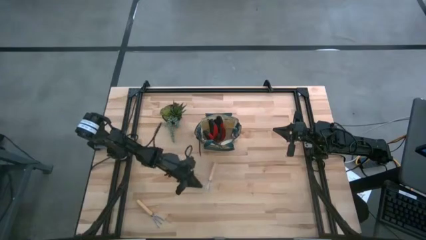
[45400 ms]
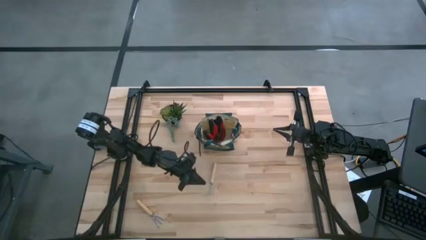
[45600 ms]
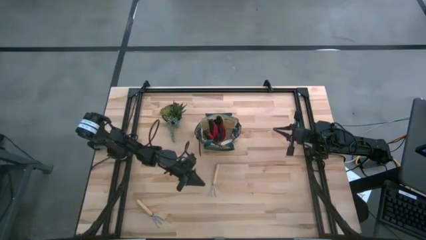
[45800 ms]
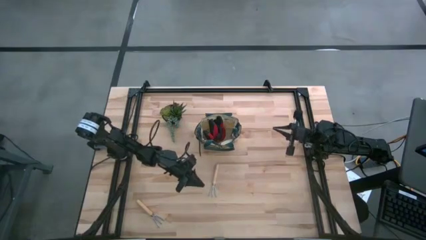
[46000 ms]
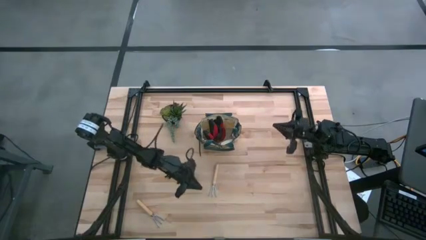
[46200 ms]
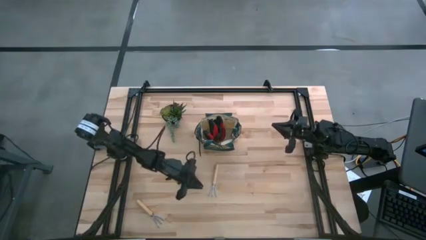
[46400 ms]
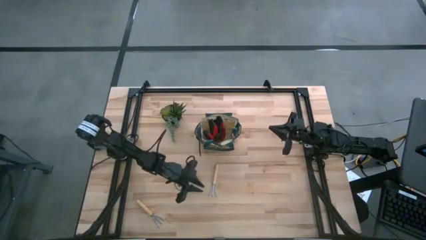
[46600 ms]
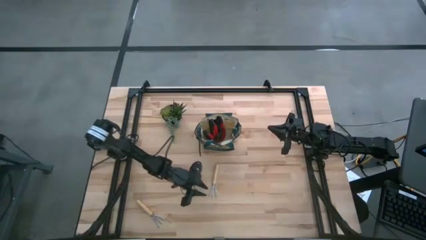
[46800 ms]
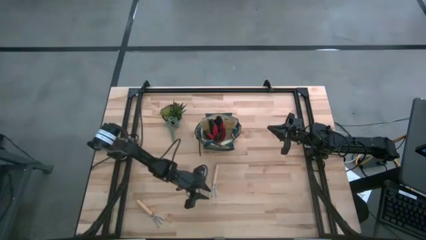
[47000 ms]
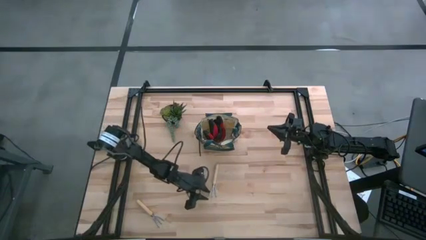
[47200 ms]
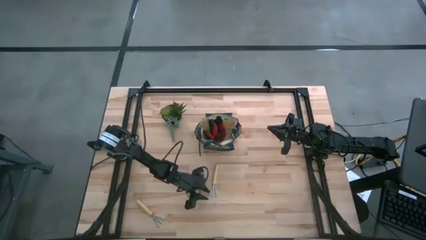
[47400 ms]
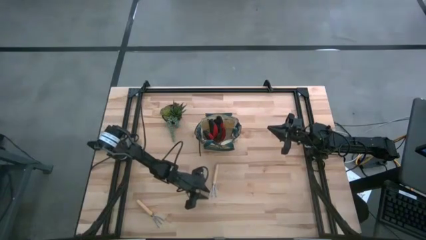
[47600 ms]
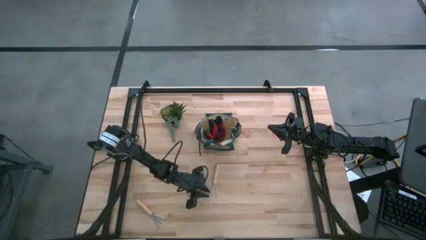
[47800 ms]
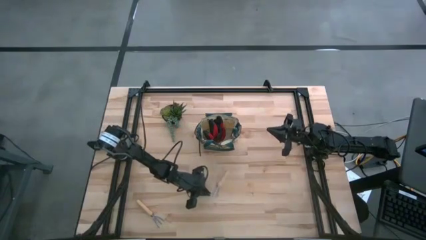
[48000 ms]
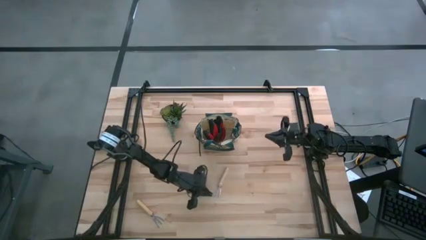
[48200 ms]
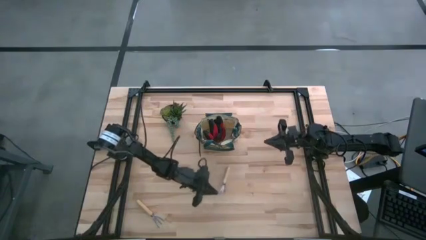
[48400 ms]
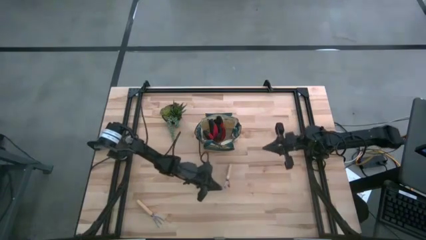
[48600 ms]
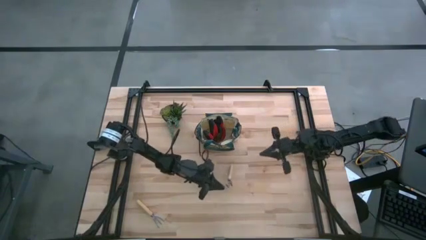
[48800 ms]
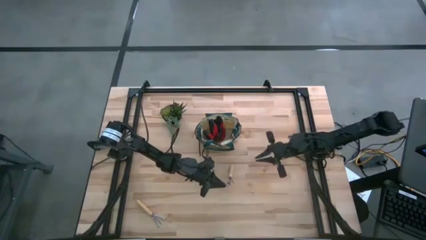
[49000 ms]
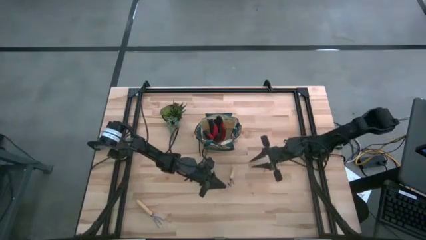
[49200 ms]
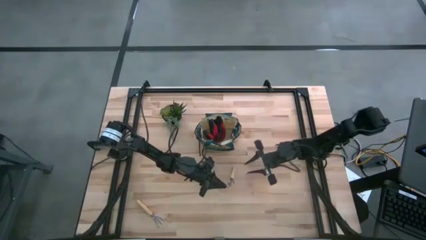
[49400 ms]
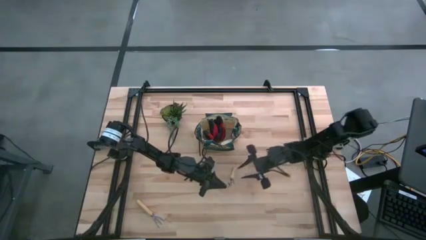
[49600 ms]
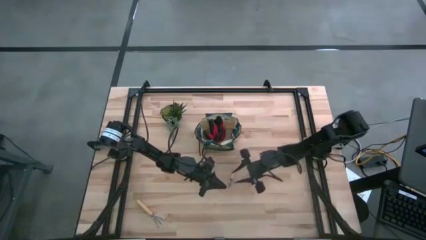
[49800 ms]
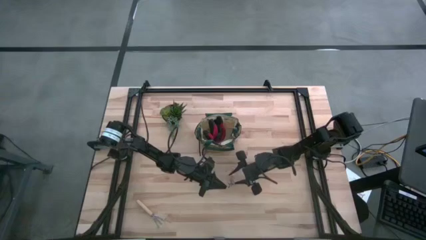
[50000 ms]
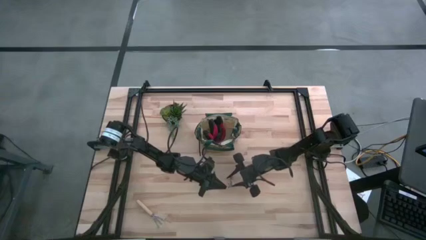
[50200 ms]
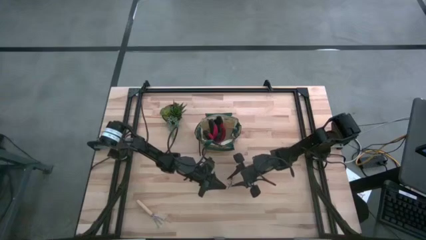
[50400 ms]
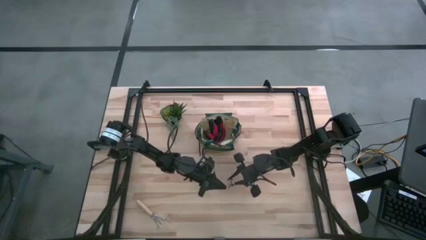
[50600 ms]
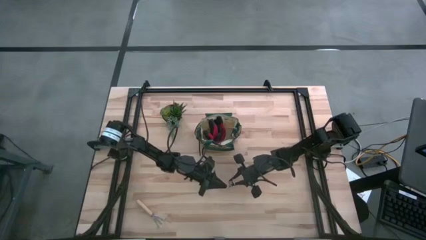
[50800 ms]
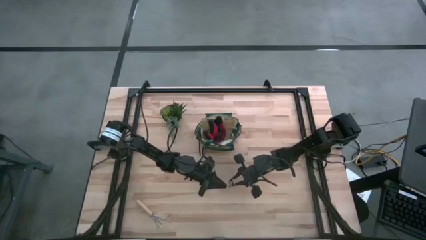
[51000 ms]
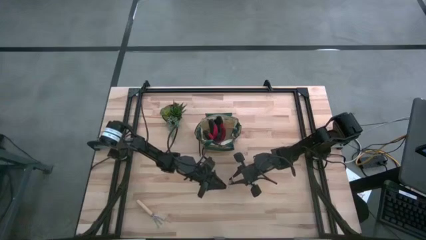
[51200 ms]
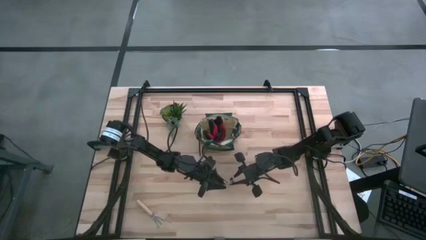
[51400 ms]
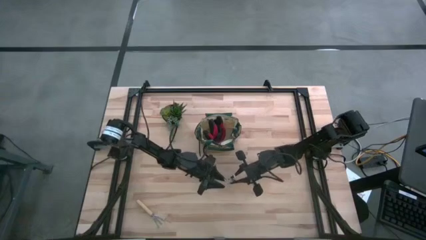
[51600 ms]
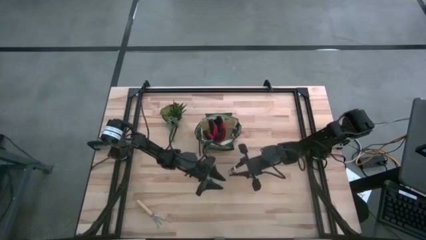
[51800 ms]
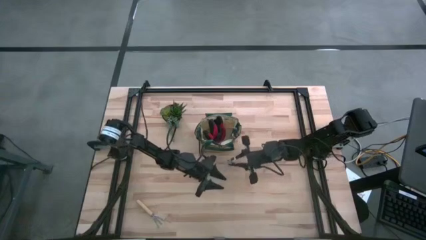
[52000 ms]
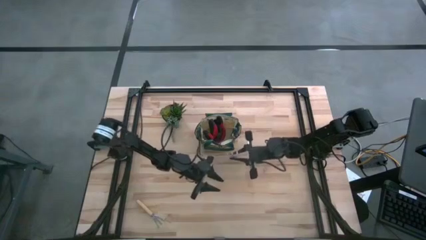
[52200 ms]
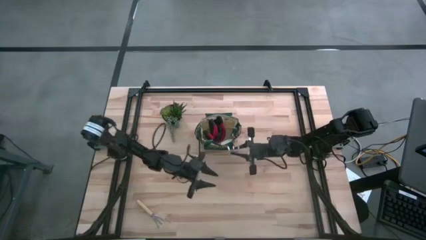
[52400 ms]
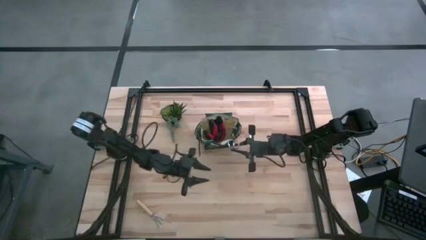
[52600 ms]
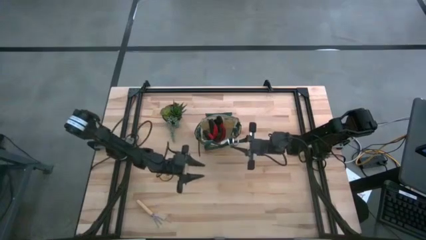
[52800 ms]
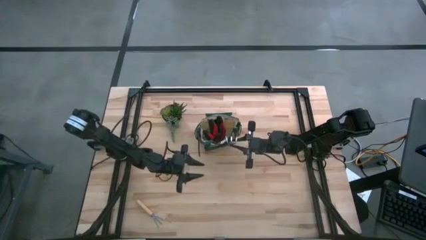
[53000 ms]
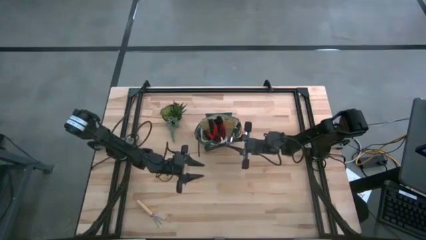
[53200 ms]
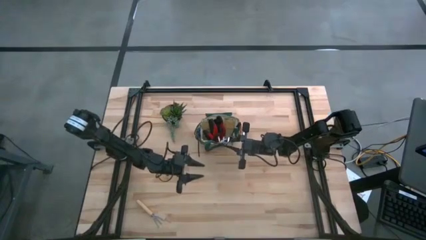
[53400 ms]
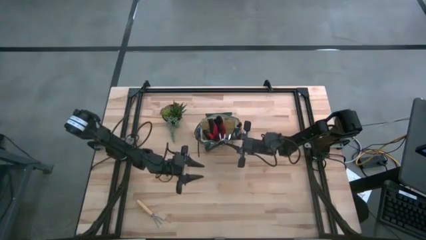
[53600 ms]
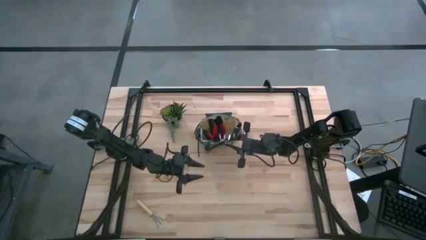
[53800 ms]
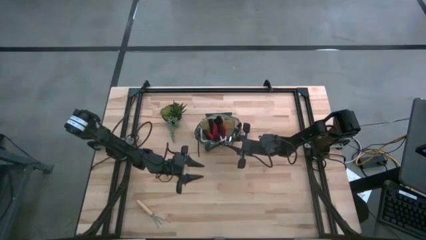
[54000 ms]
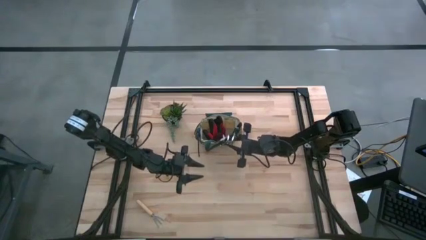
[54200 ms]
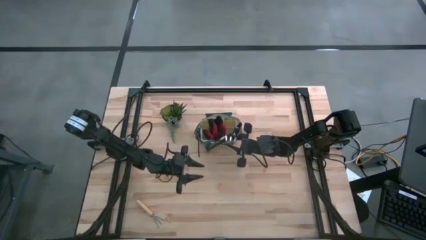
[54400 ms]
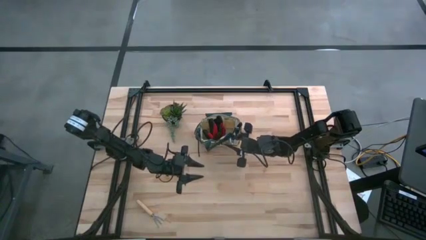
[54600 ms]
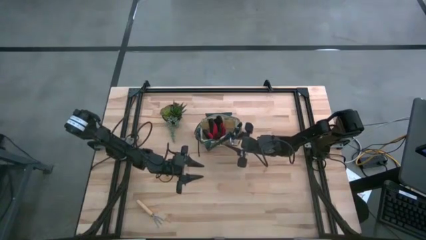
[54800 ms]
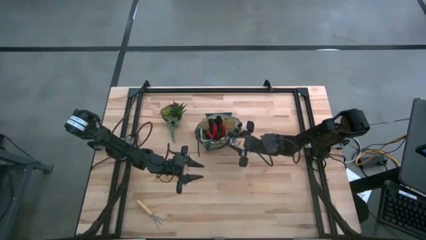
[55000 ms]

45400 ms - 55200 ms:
Task: Pick & Place Garden tools in Gardening bag
Put the brown hand rake into the white gardening bag

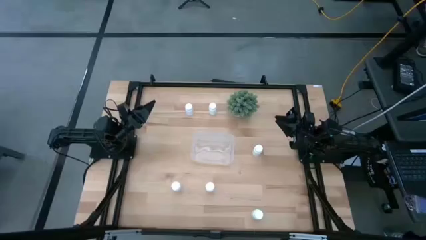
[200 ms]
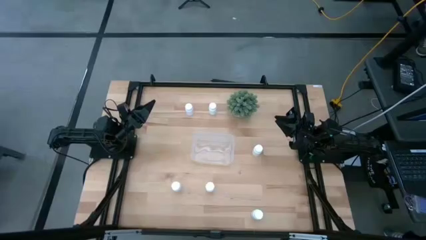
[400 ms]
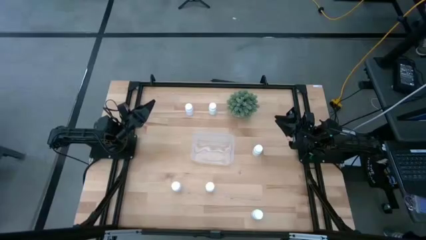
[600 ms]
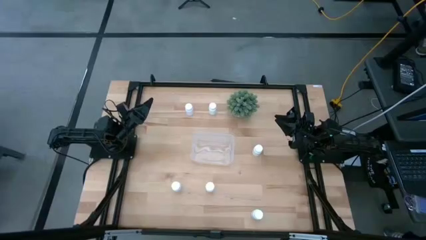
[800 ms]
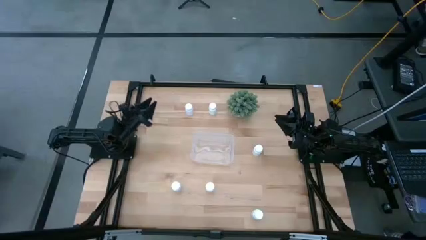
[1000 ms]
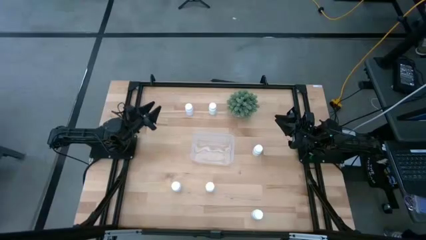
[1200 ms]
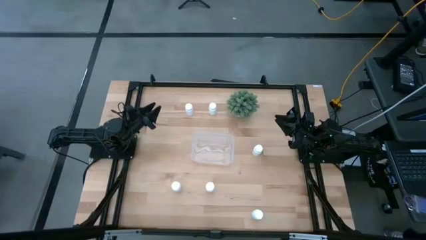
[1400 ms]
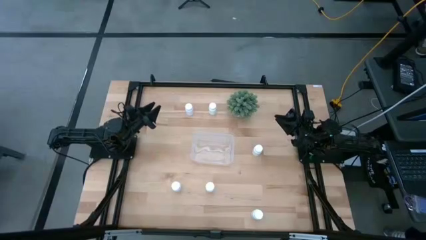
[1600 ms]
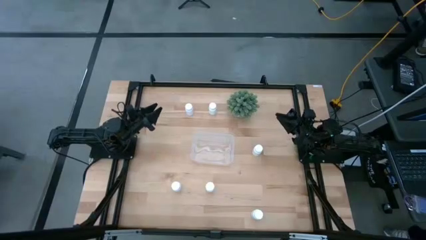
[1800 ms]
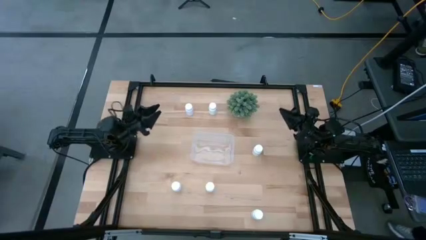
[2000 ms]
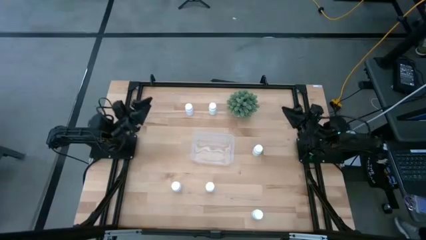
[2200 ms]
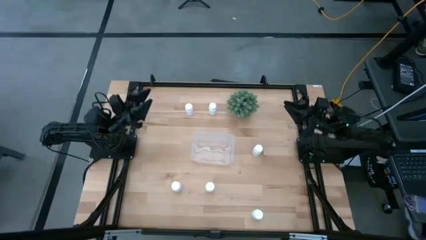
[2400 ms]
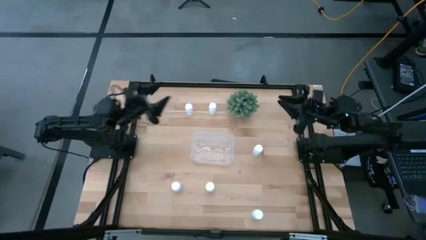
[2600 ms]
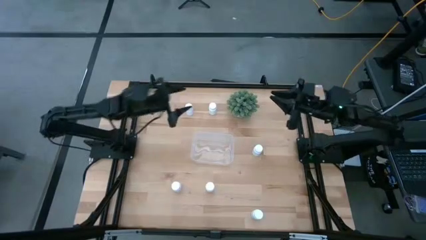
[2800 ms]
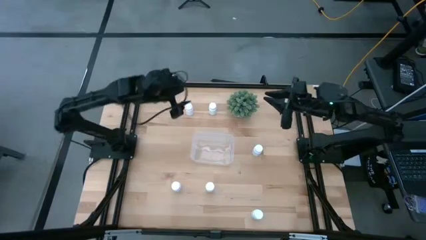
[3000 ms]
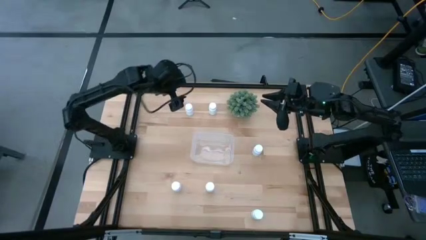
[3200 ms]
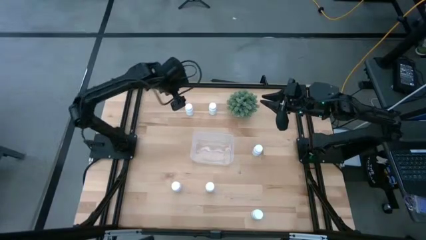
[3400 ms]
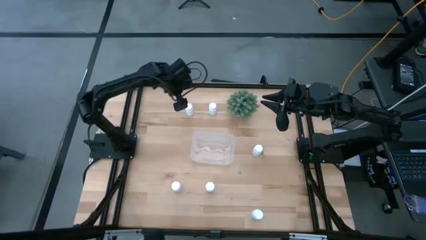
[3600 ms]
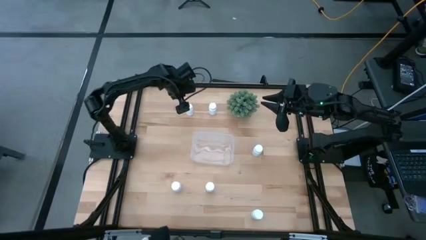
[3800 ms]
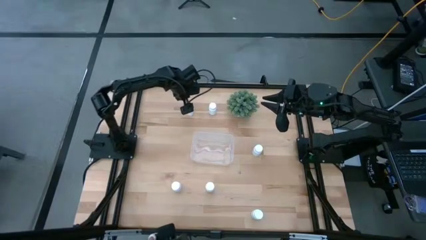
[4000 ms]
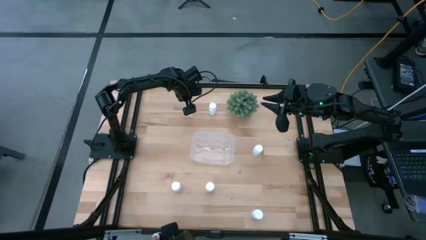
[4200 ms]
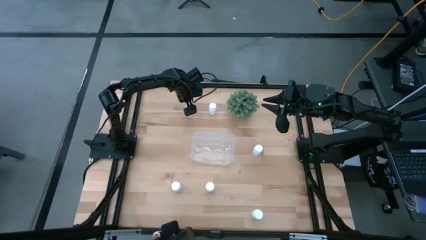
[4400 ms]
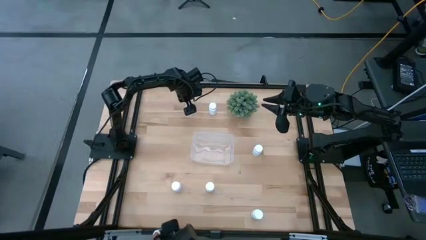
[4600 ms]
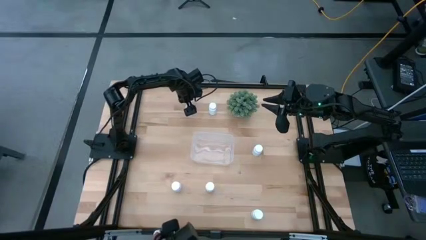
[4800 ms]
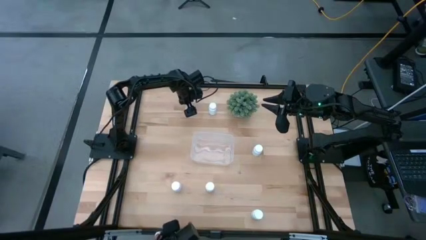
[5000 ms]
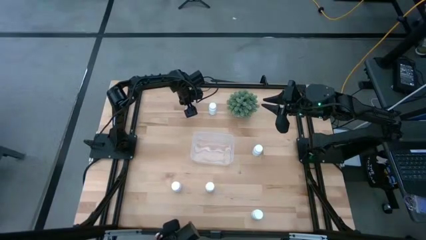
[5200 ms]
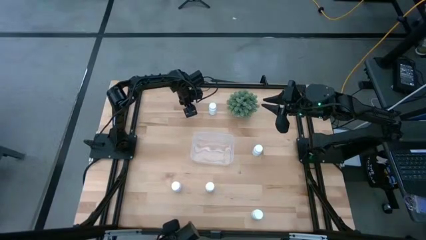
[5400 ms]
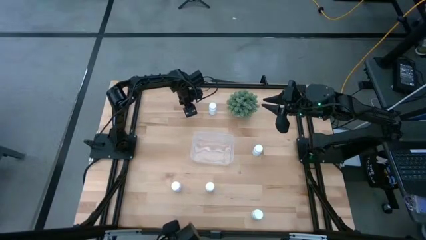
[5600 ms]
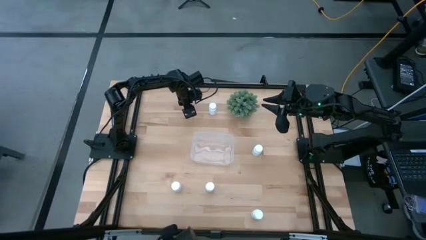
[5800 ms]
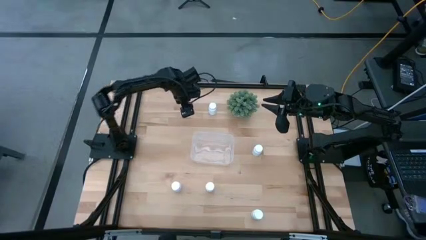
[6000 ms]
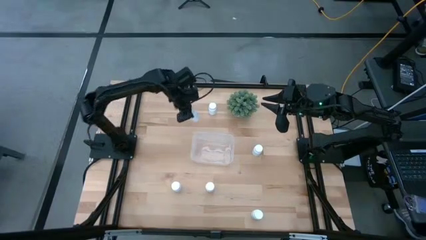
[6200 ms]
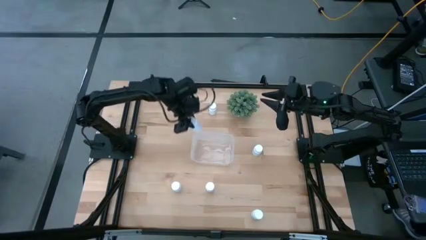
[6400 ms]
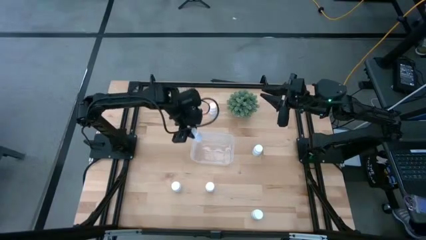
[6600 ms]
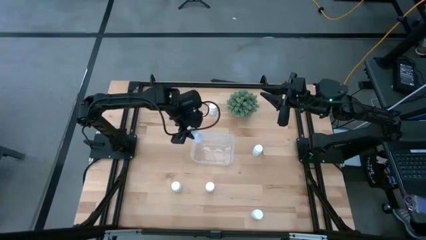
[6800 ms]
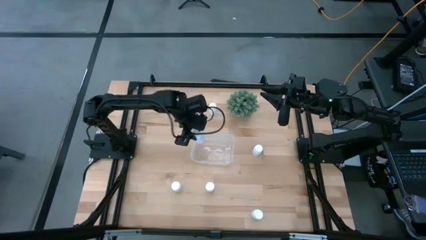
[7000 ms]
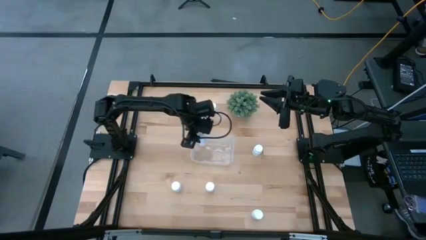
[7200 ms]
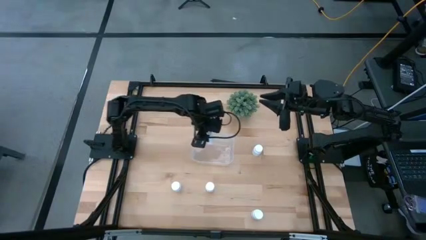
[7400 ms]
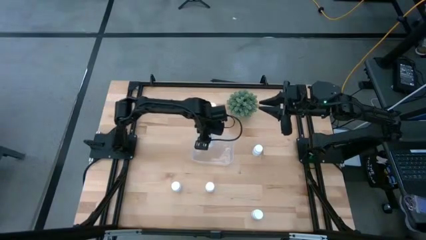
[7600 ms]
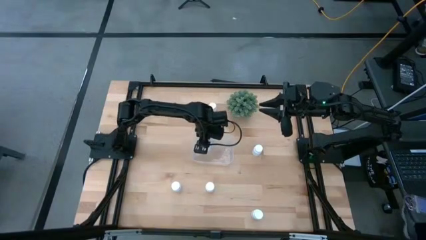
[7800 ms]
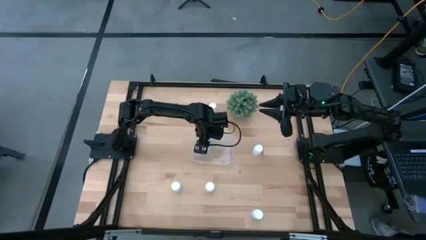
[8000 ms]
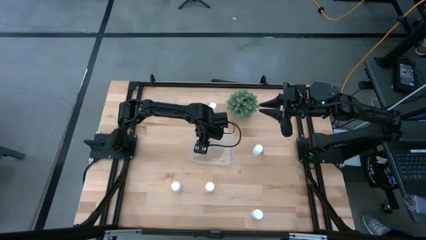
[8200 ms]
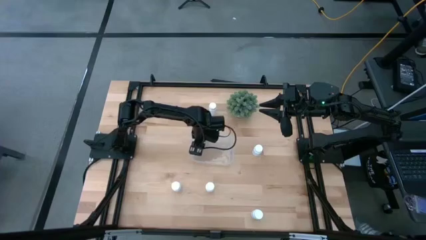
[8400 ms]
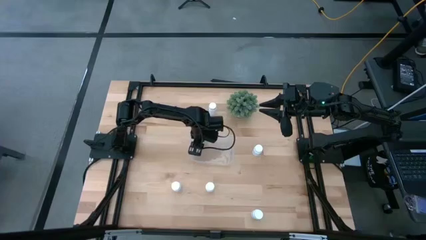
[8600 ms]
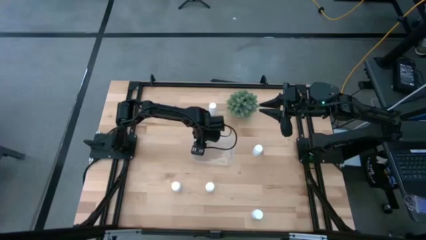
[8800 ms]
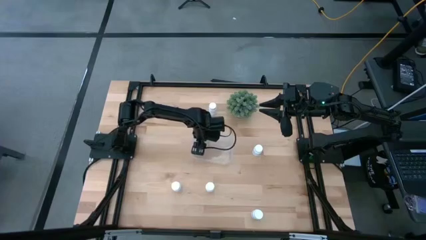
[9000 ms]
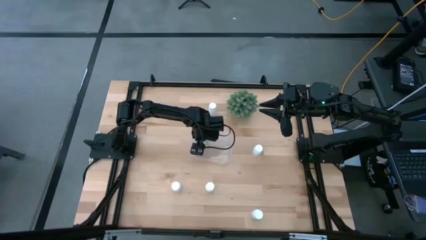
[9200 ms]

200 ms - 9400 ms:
Task: Pick and place pill bottles into a basket
Put the white pill bottle into the transparent bin
